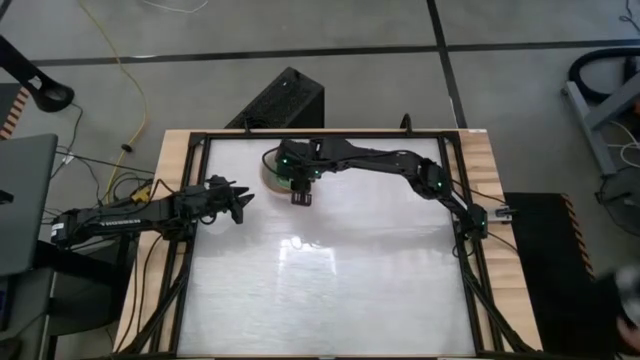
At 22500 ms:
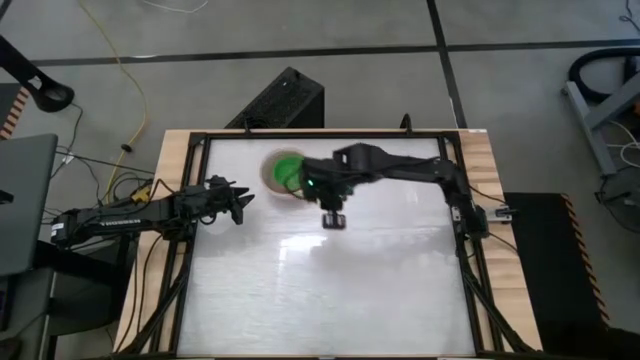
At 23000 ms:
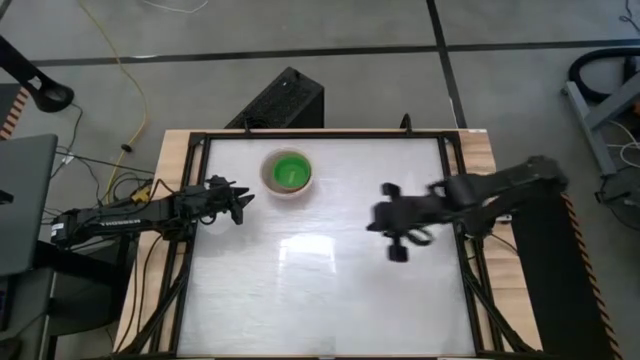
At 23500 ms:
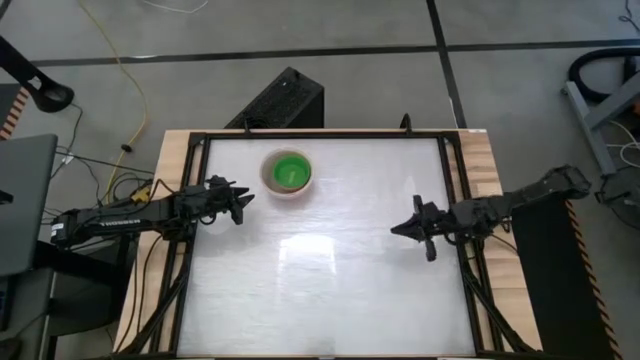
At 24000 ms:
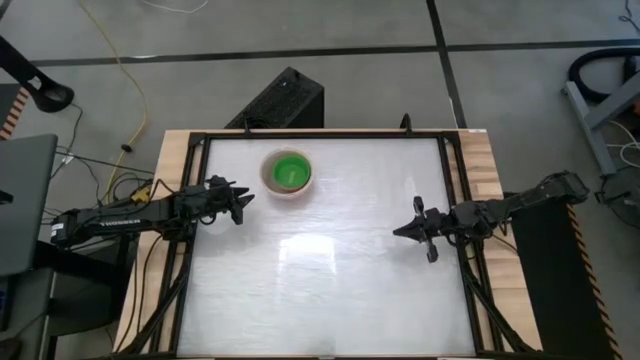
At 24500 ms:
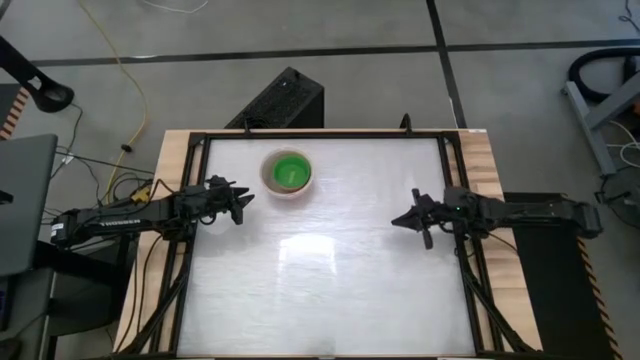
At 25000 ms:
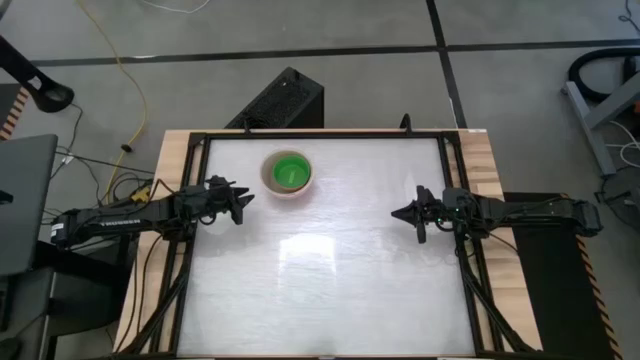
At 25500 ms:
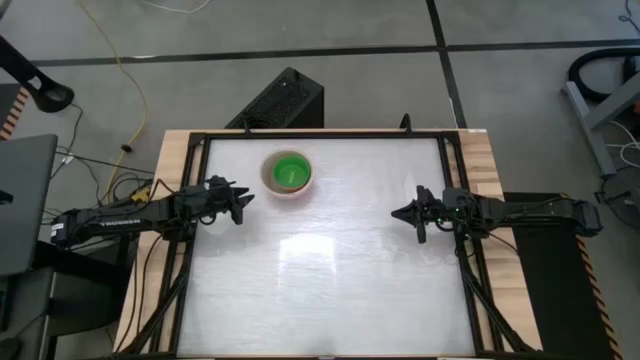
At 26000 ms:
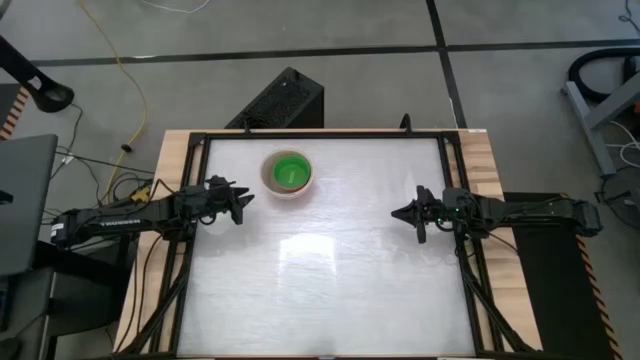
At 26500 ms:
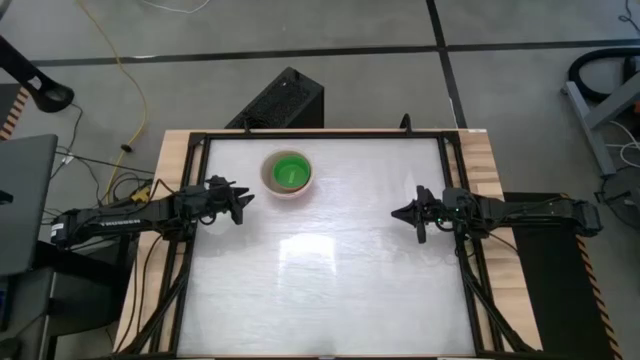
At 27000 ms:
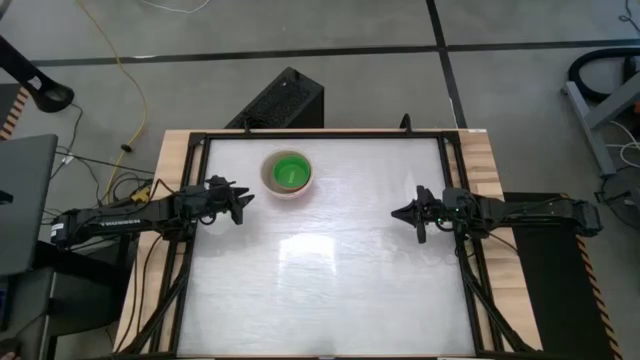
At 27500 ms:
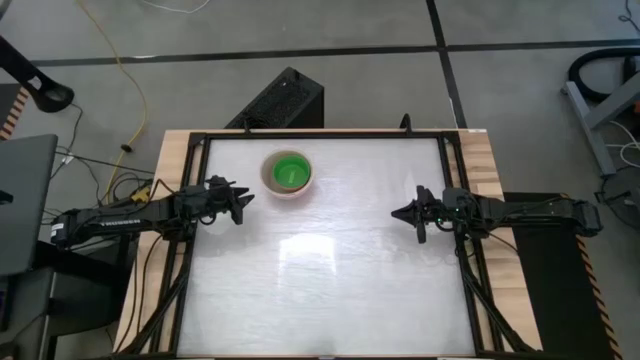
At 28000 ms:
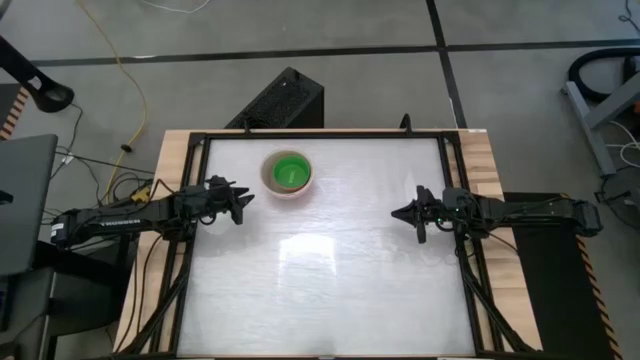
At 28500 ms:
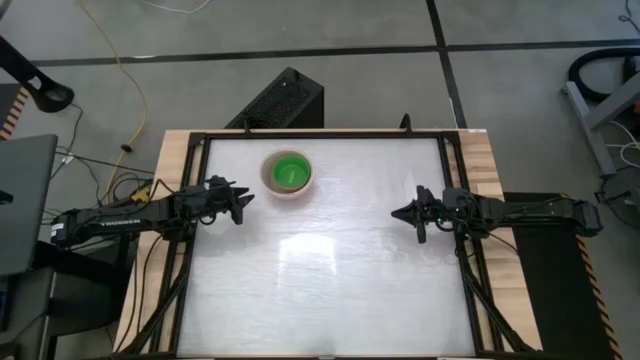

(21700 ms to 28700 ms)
Return to Home Position

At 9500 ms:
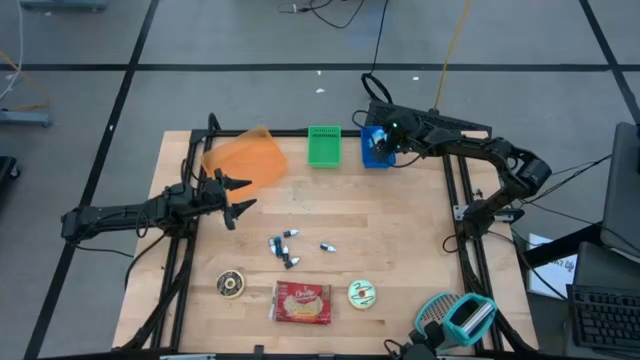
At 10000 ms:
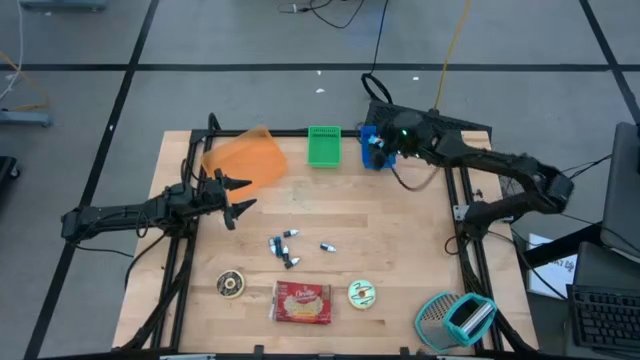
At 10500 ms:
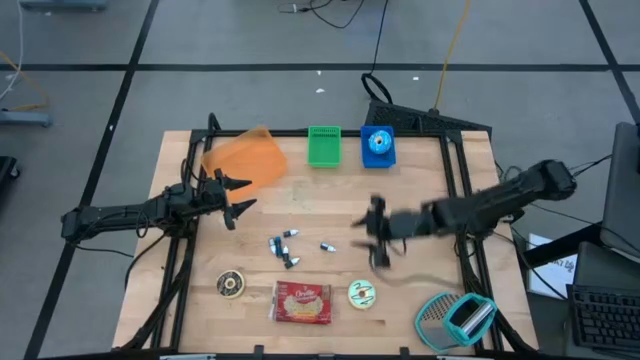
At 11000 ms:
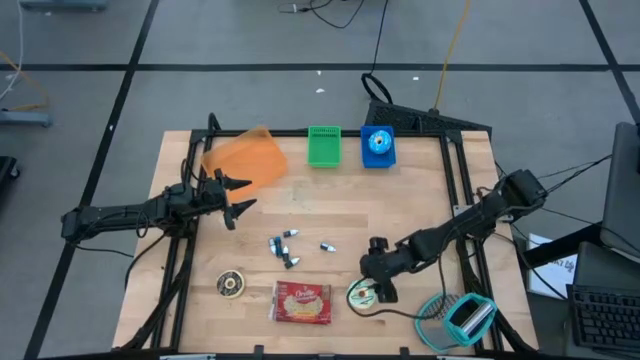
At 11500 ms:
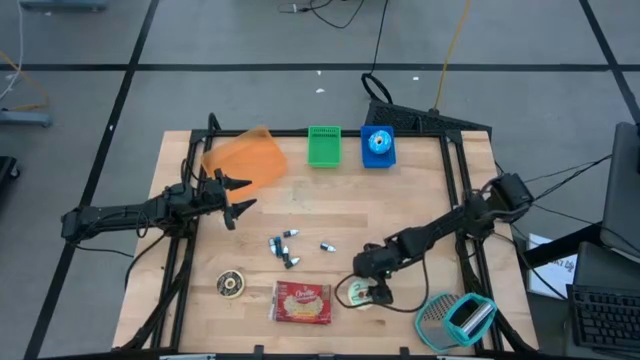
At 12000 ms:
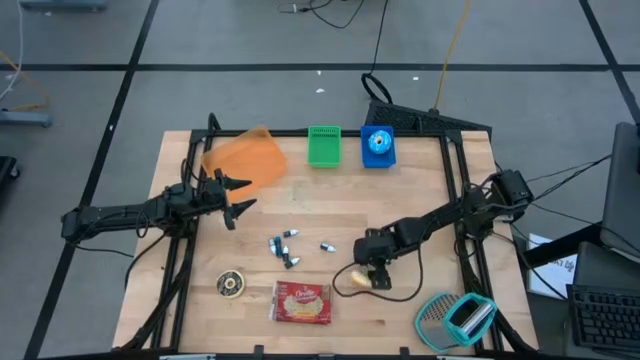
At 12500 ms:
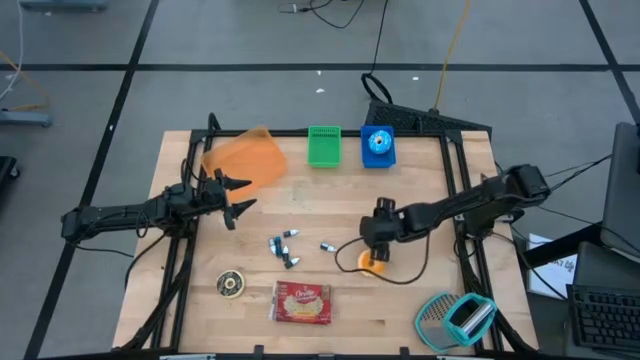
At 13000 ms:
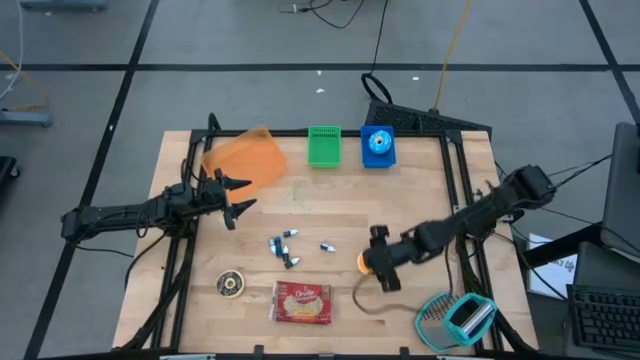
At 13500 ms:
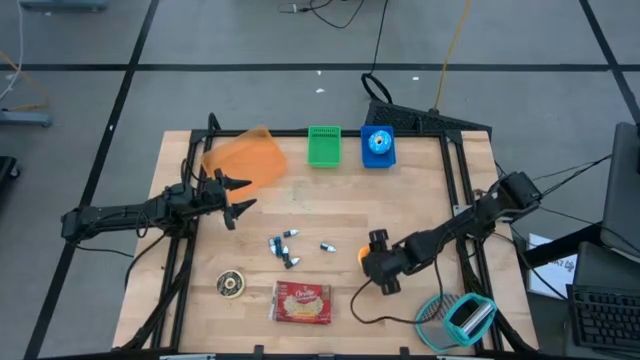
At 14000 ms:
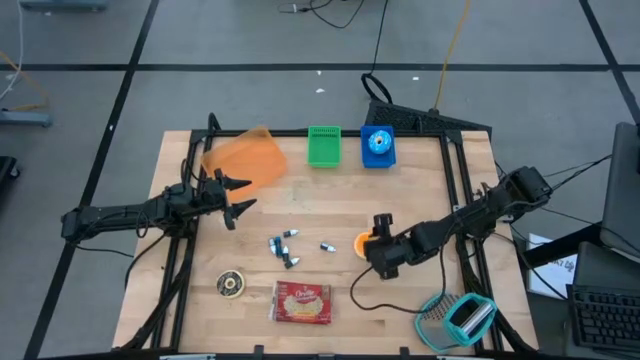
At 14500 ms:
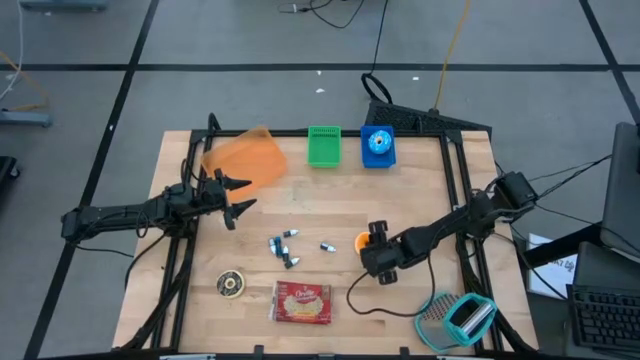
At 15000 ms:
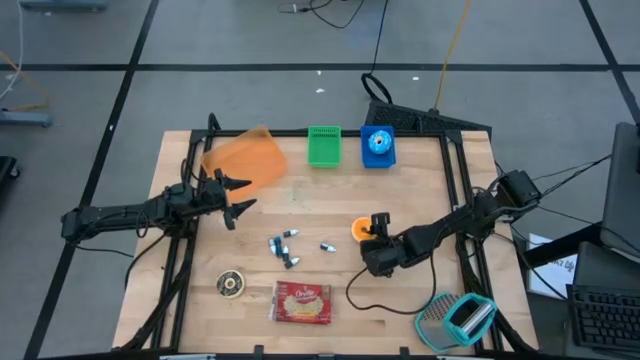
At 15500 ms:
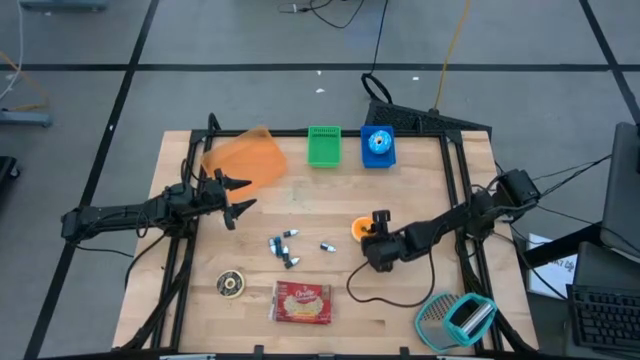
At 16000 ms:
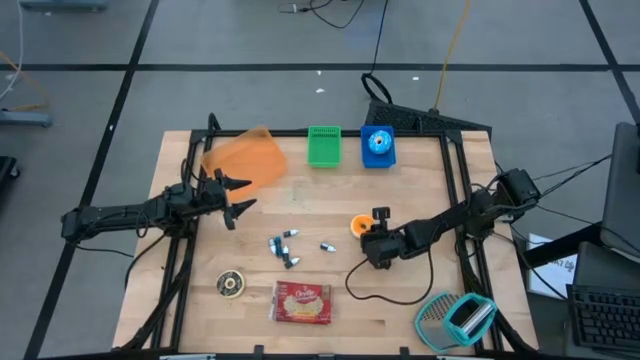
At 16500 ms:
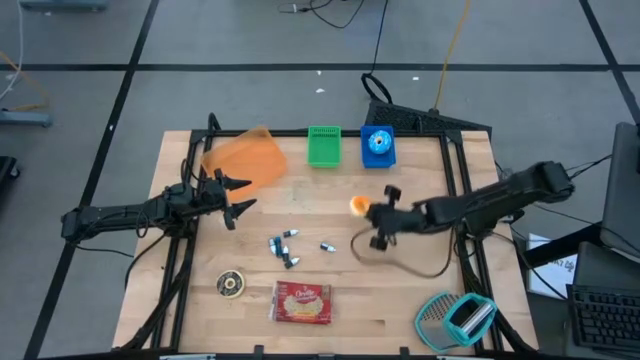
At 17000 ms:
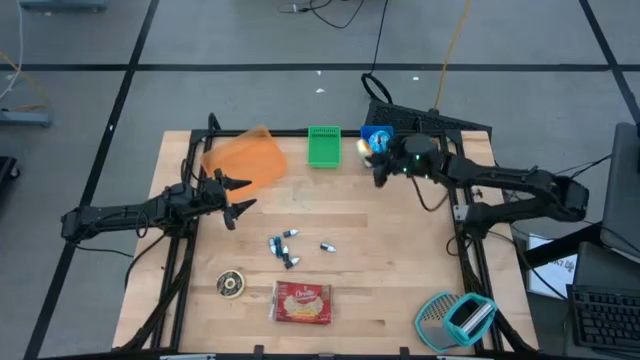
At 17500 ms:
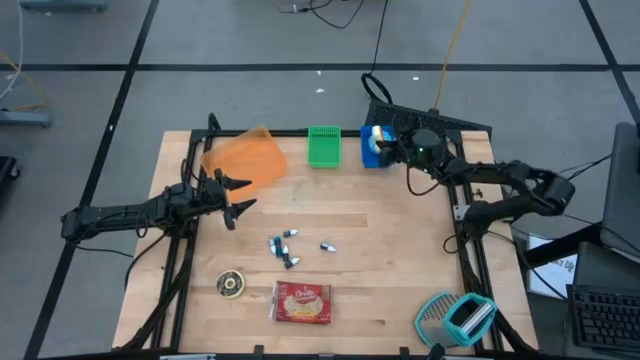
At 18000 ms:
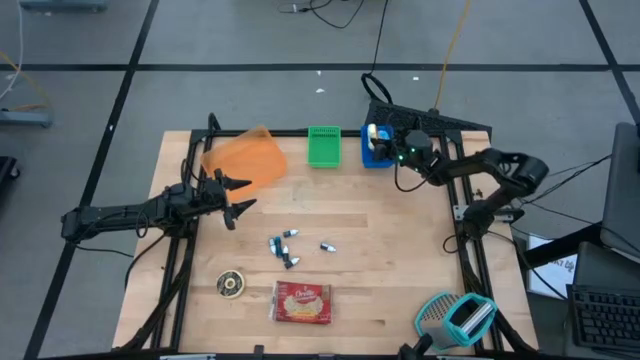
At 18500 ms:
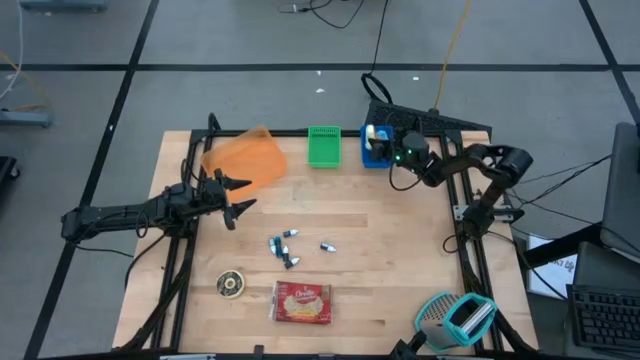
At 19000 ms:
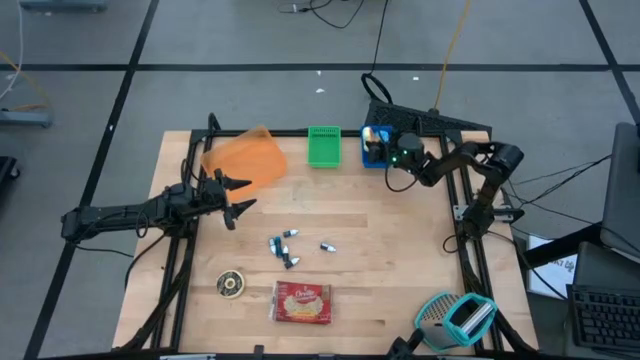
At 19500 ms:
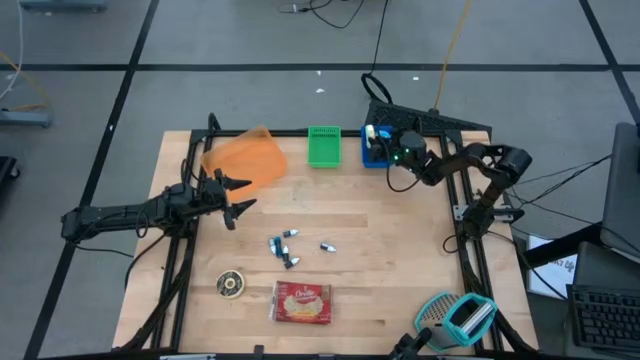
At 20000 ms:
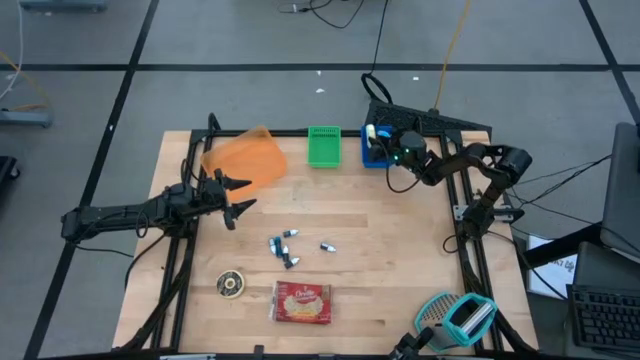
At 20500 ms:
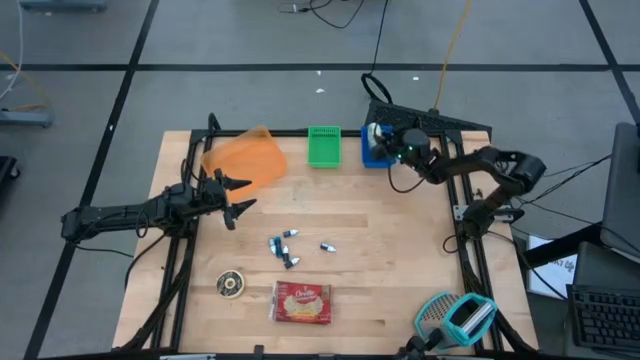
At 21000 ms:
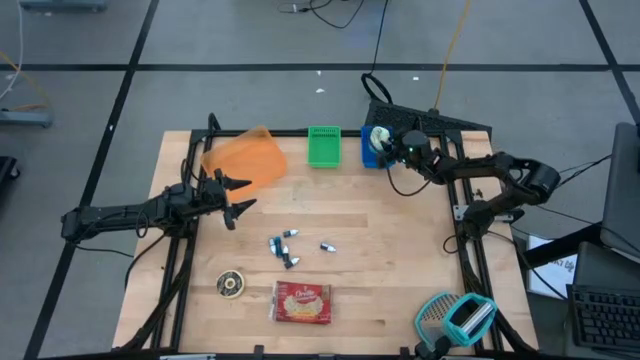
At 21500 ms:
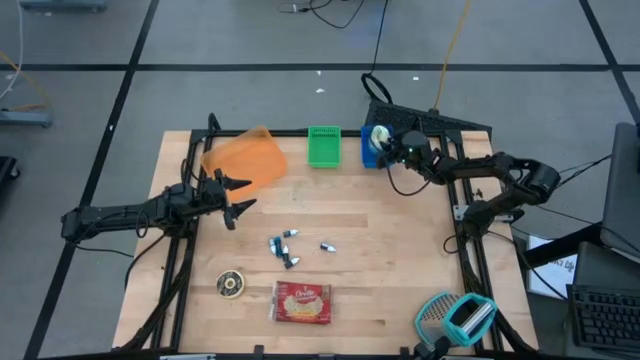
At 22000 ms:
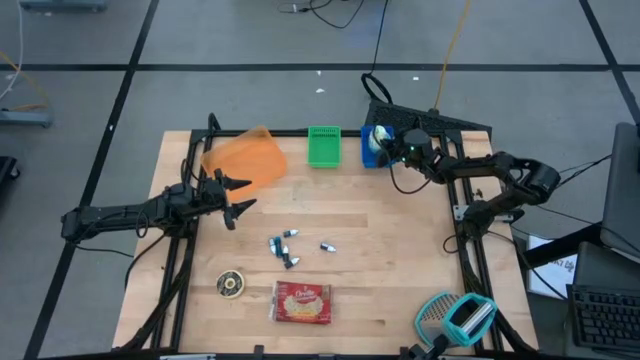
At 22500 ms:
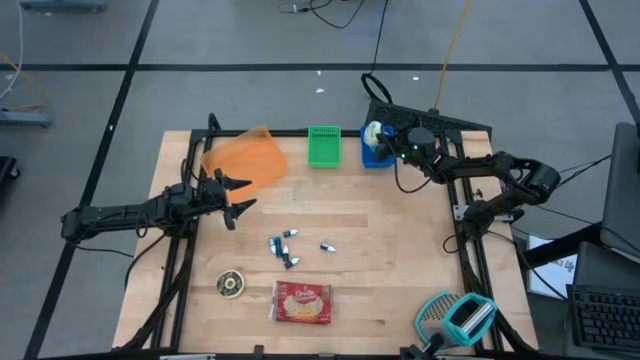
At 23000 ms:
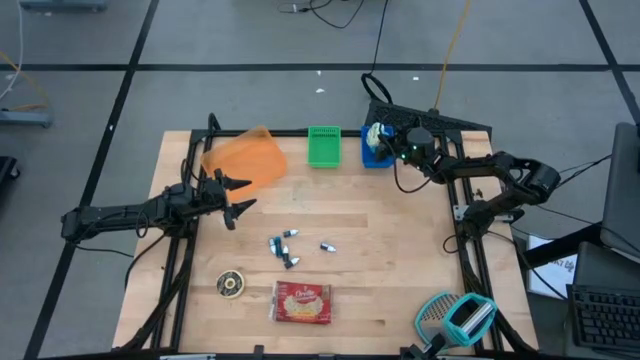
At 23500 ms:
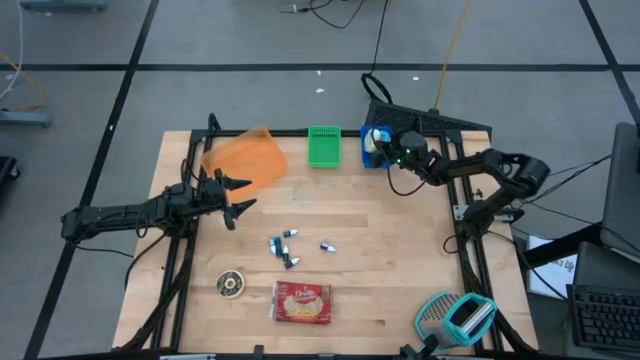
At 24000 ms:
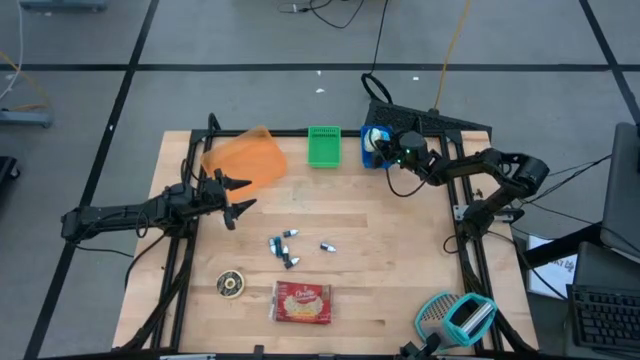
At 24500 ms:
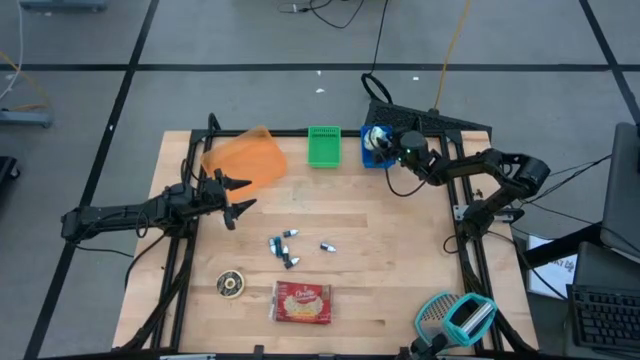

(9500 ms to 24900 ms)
Put the light blue doughnut into the blue bin
